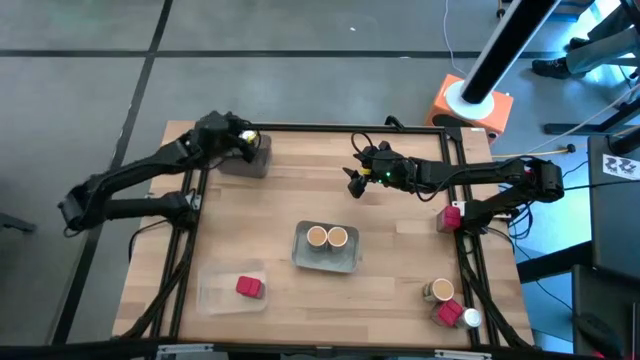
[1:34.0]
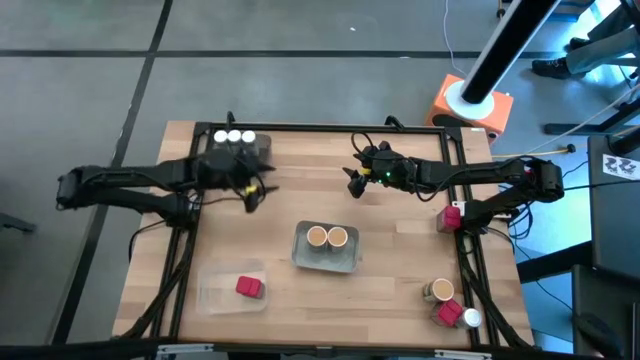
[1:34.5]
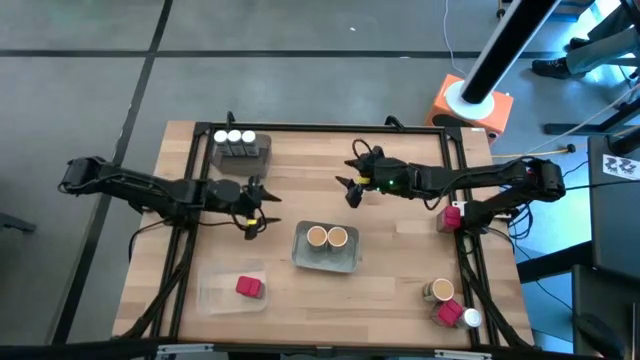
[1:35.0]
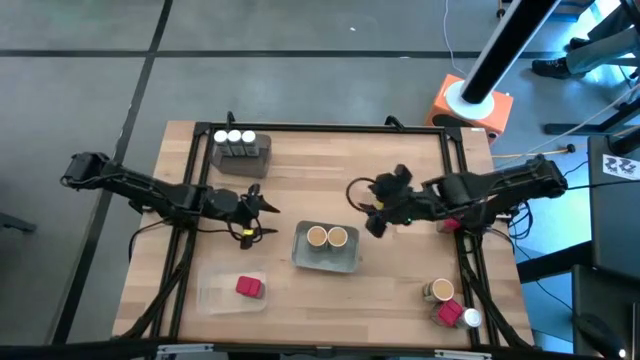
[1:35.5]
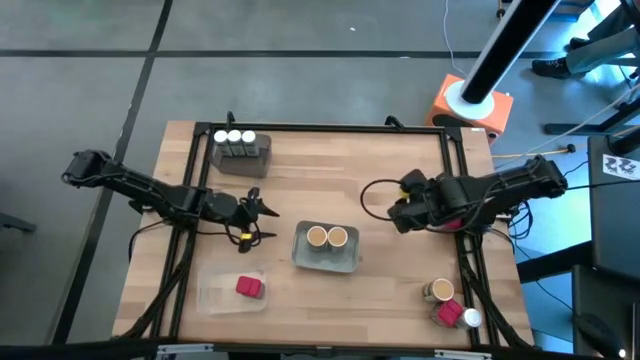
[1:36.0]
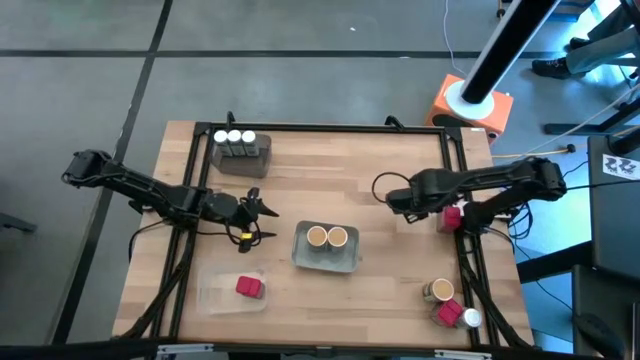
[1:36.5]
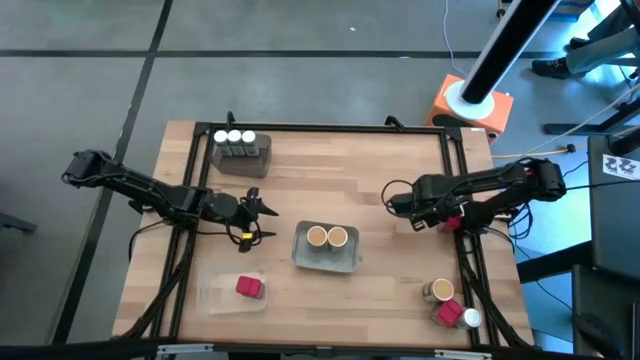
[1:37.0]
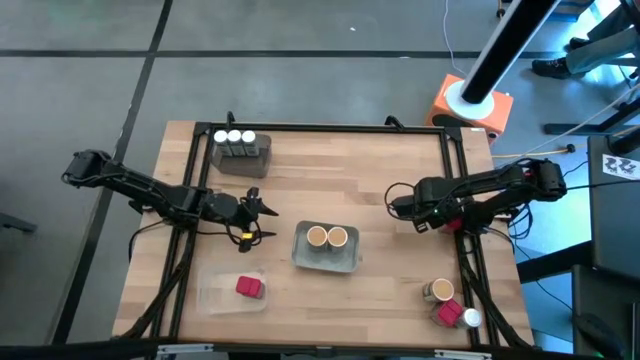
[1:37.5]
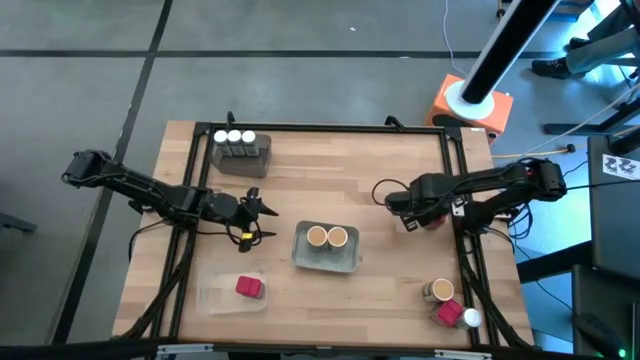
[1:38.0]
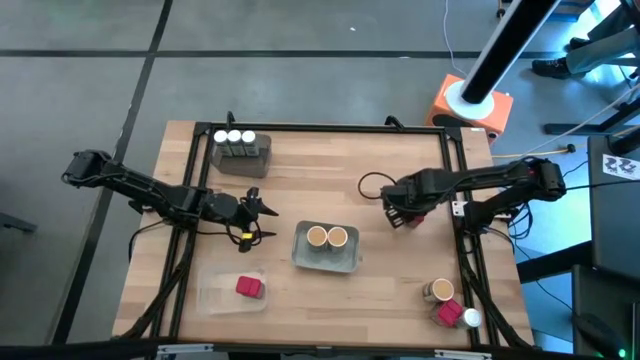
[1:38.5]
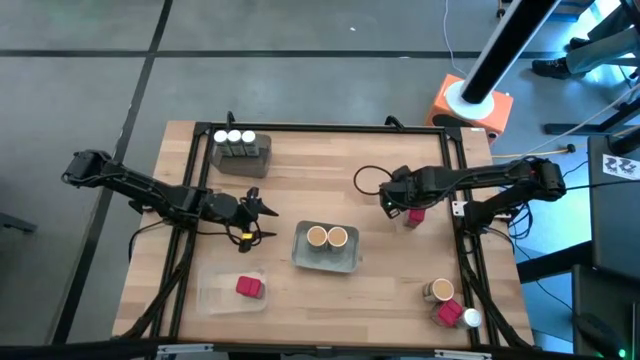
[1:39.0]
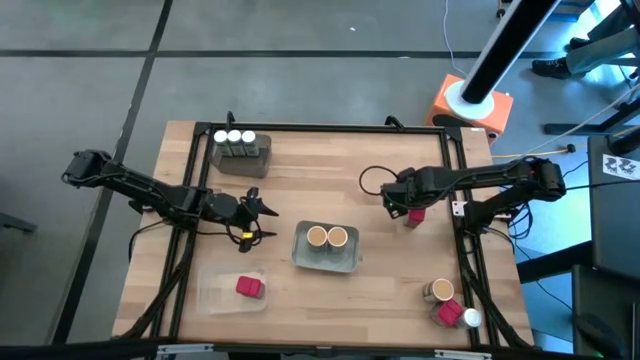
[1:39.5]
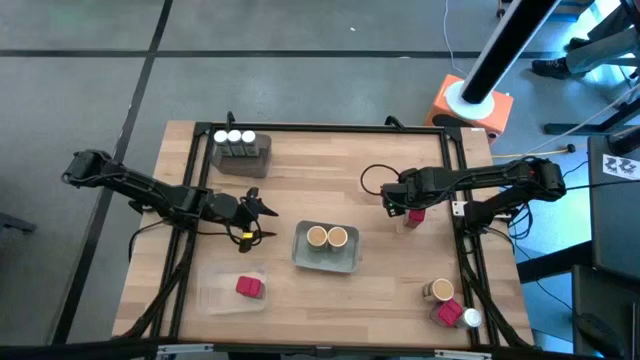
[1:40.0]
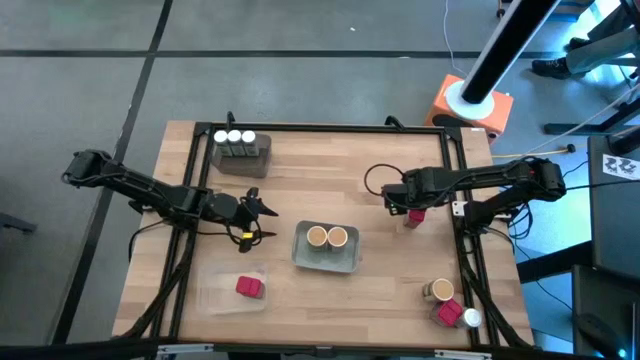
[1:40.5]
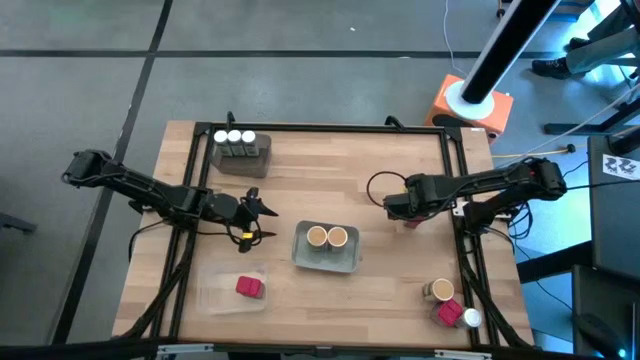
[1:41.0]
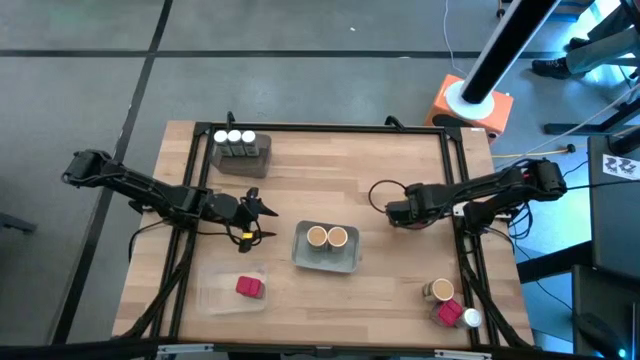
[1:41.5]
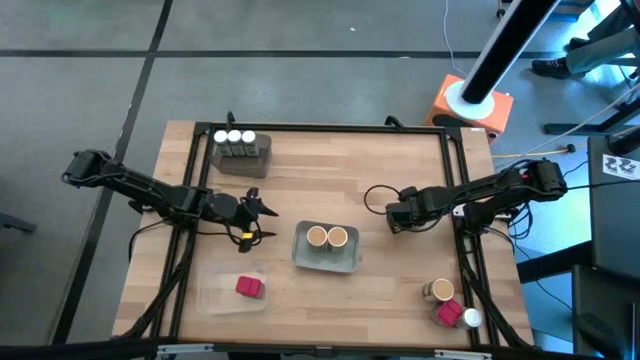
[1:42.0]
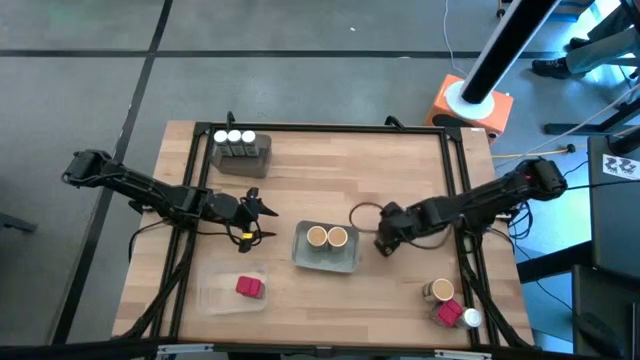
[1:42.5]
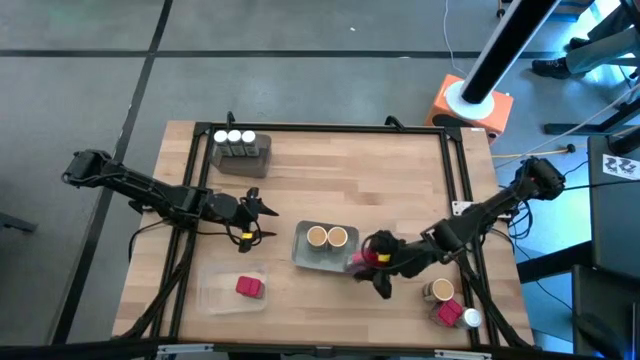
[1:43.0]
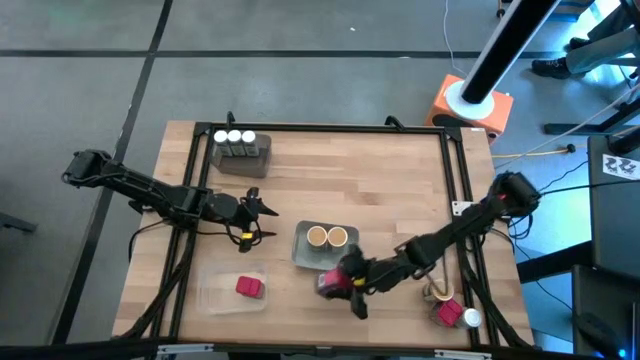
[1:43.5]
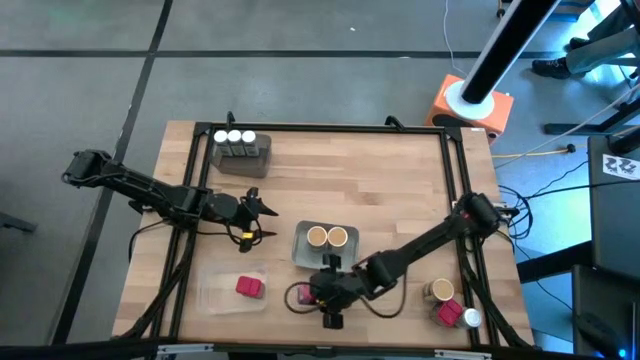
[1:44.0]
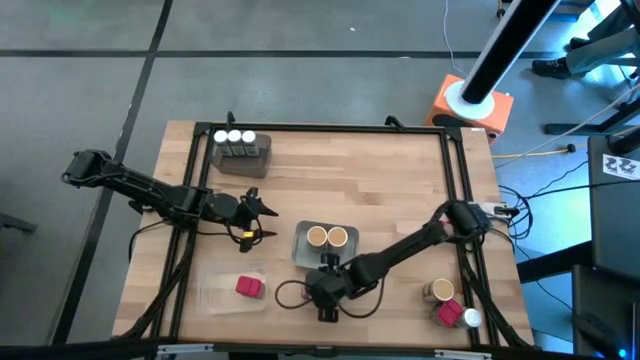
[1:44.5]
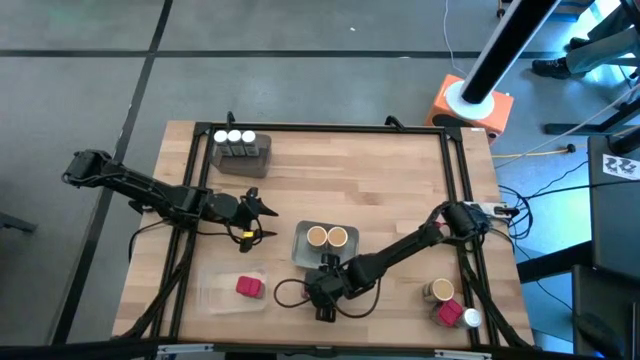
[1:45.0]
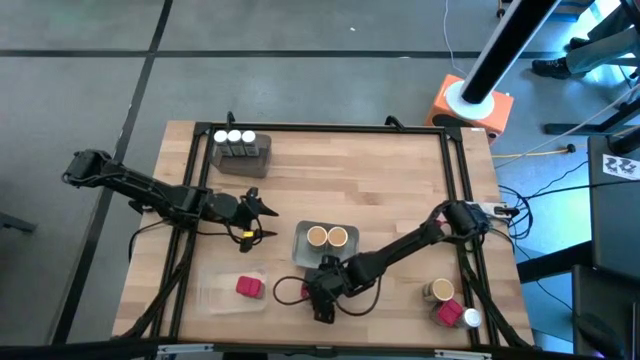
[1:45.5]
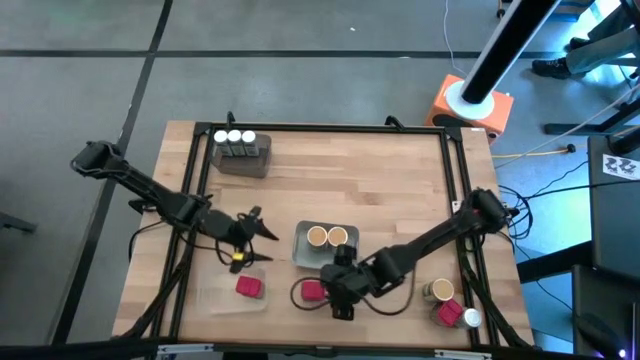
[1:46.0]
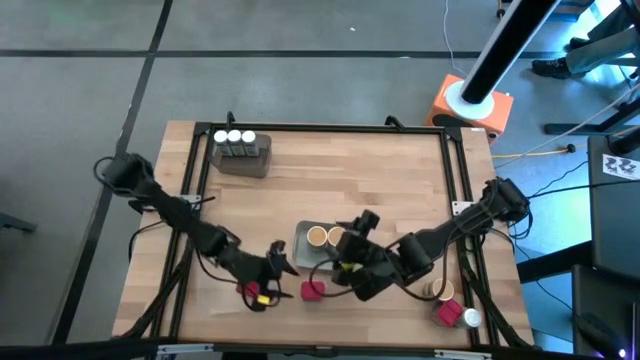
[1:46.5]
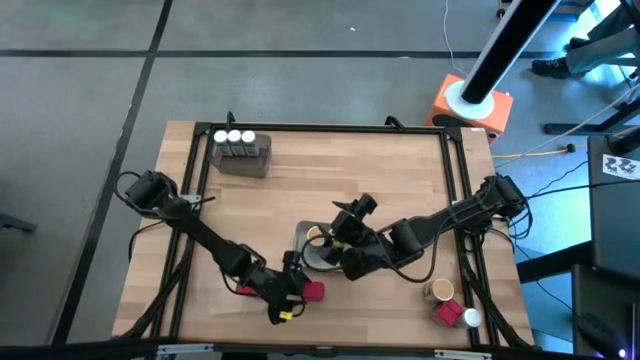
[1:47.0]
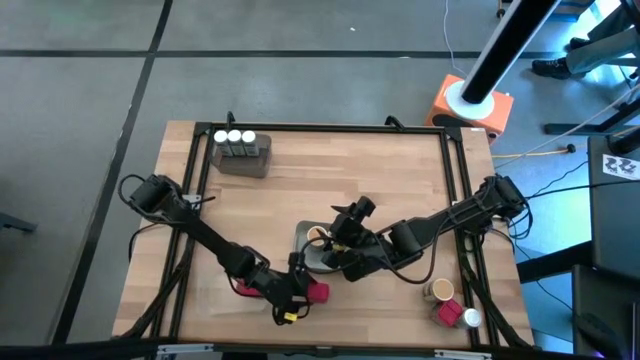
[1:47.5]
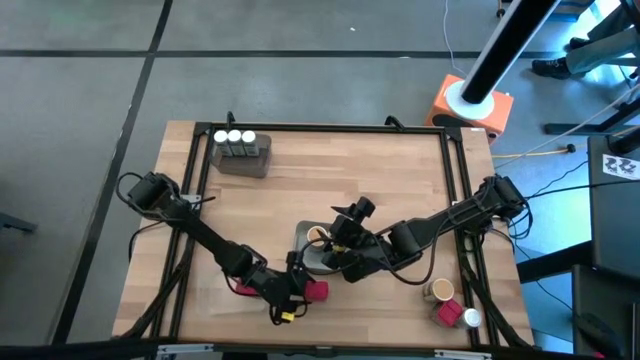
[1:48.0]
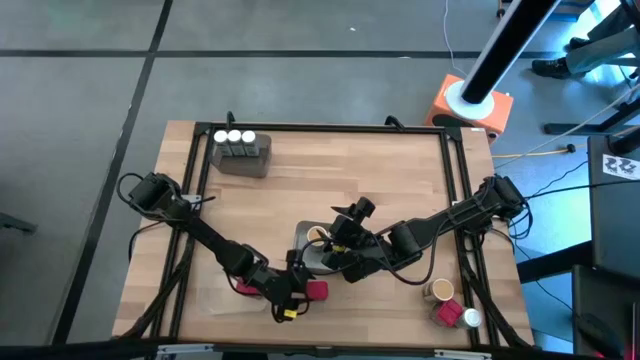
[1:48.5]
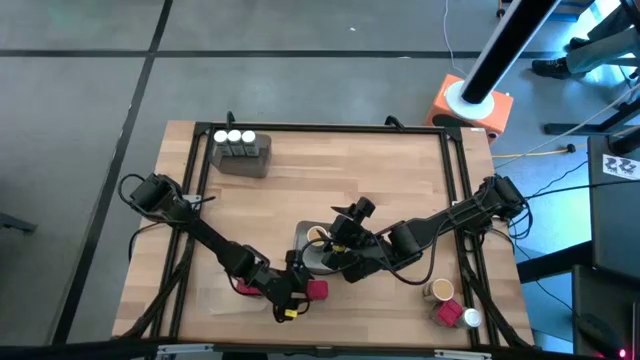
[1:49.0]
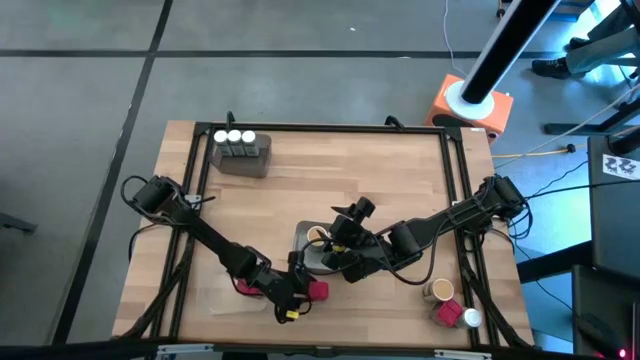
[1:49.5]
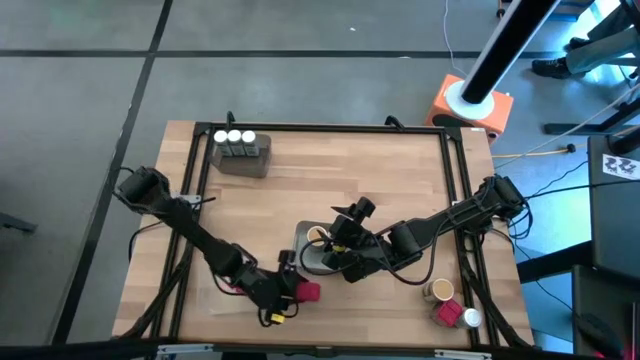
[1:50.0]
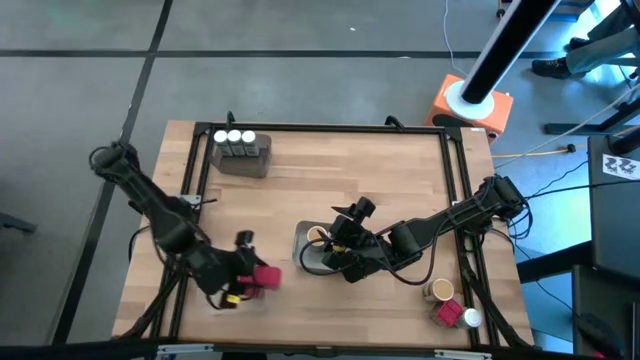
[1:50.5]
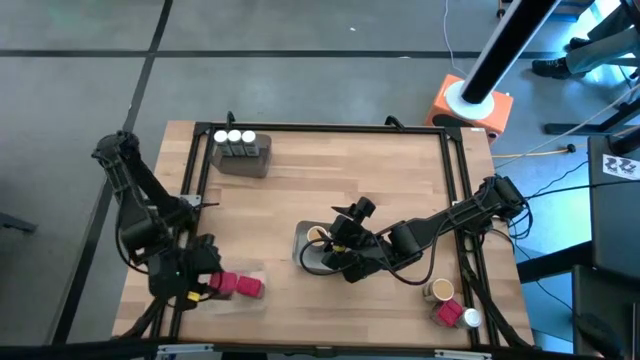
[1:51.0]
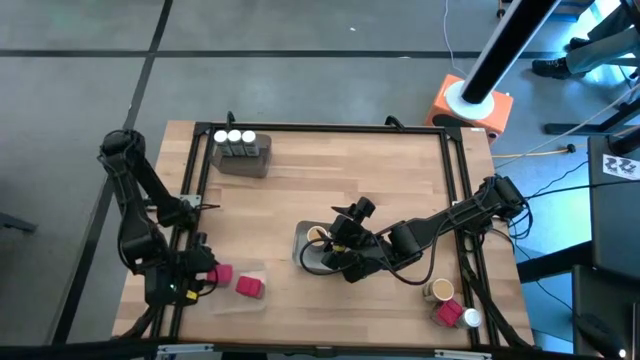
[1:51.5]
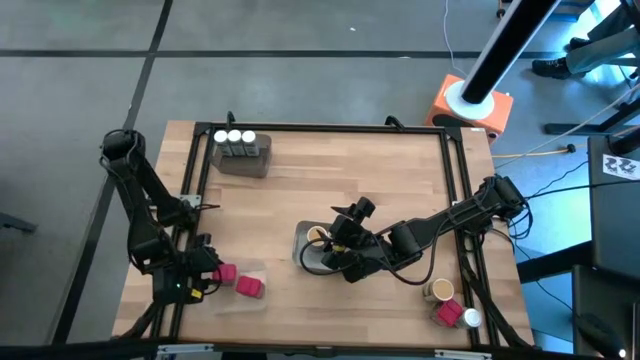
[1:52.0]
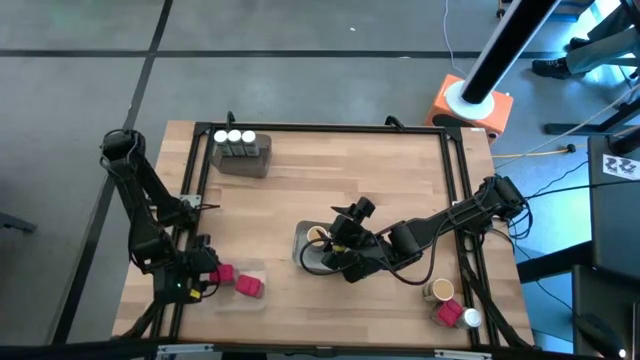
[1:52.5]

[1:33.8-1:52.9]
Task: Sort spices by type
Put the top red seasoning can into the white bin

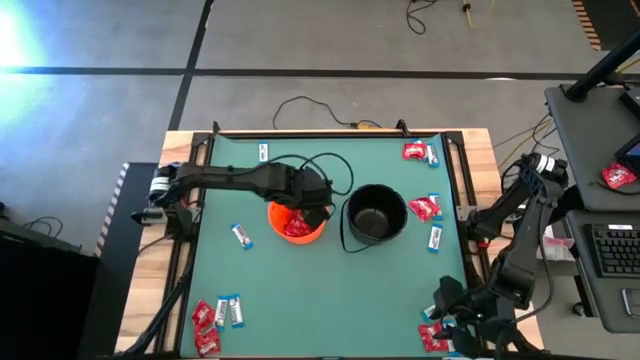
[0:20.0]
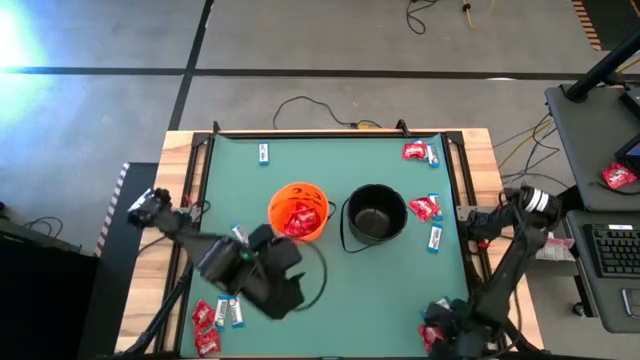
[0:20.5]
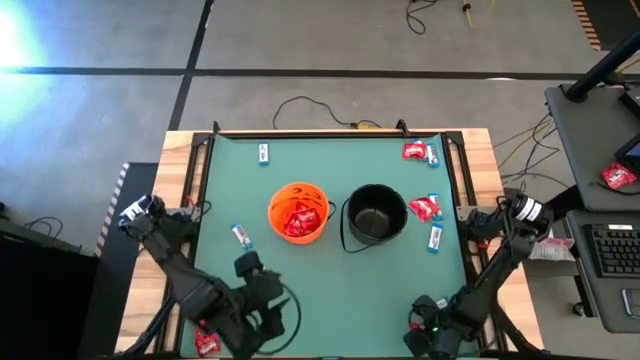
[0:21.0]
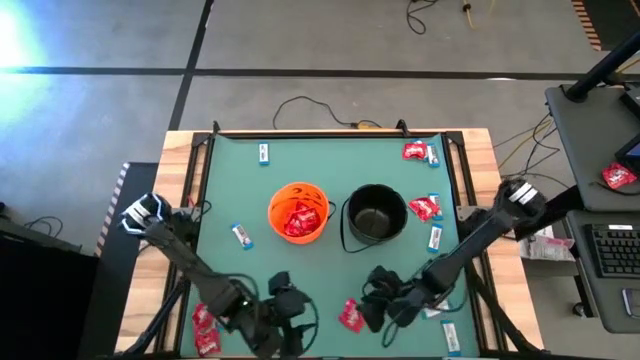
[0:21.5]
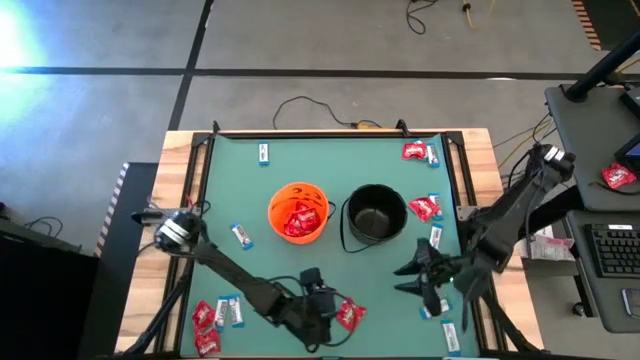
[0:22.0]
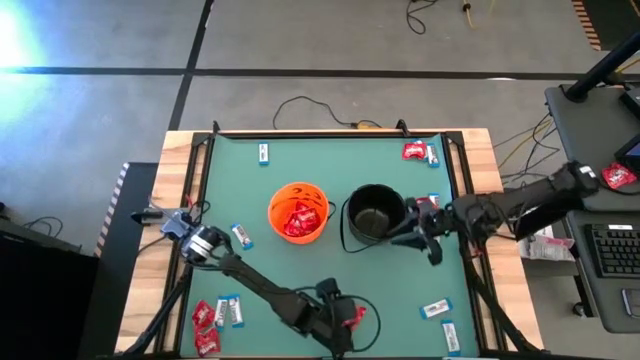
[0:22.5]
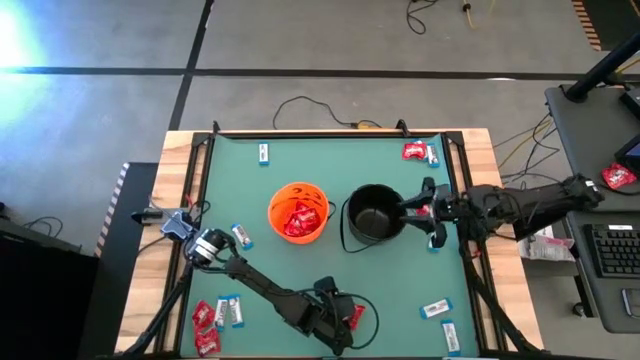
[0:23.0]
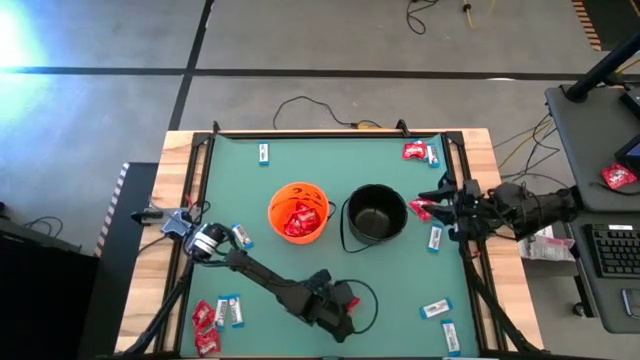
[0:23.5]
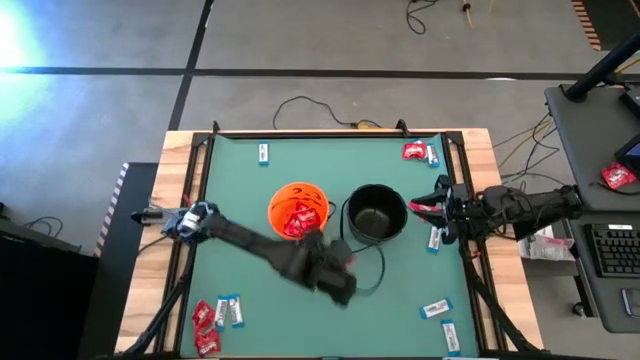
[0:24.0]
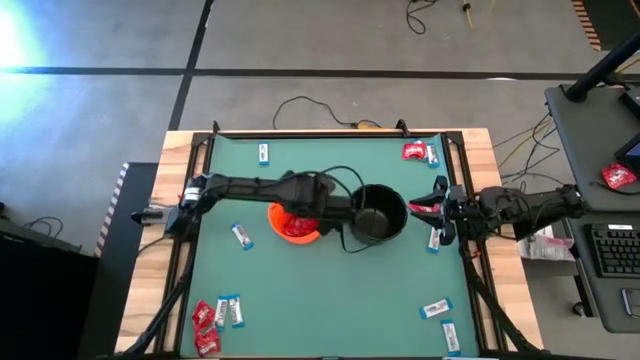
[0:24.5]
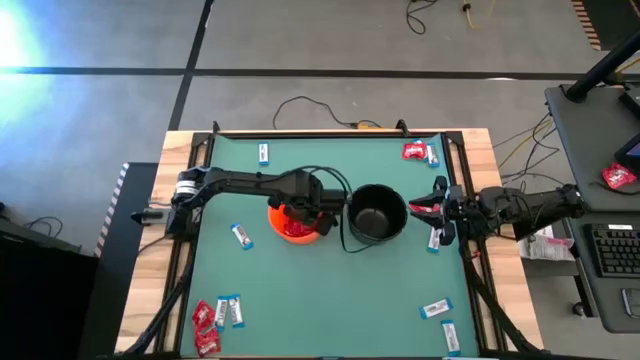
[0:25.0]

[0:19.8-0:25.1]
Task: Sort candy by brand, put in halloween buckets
Put the red candy into the orange bucket
